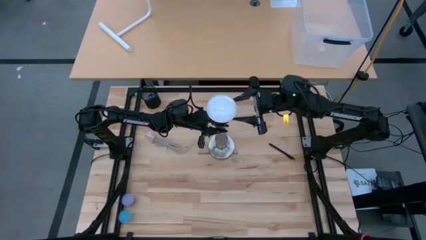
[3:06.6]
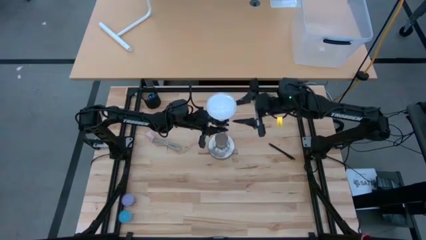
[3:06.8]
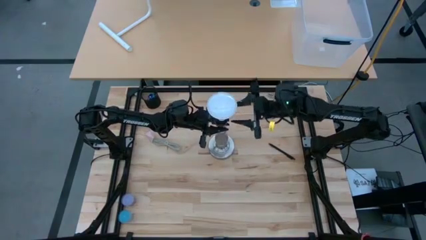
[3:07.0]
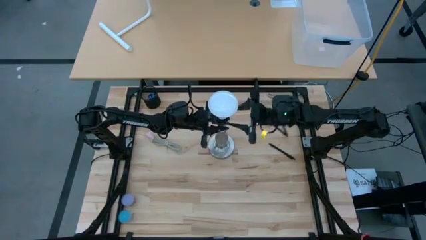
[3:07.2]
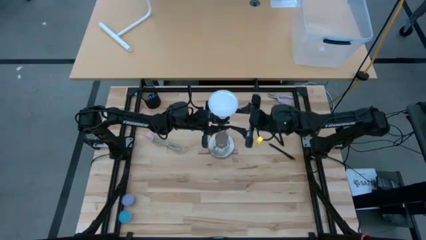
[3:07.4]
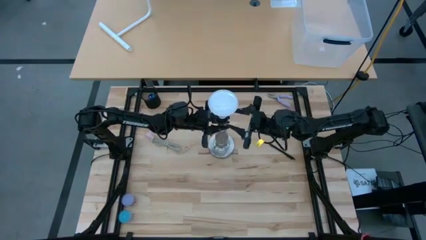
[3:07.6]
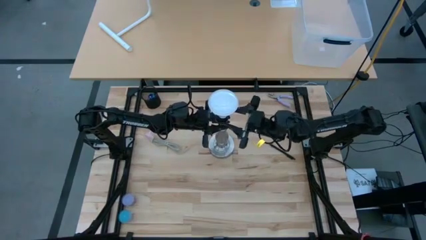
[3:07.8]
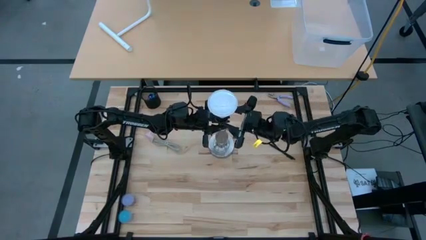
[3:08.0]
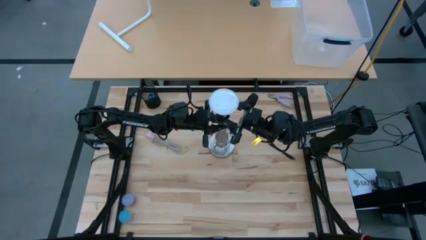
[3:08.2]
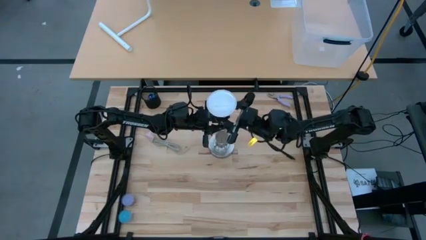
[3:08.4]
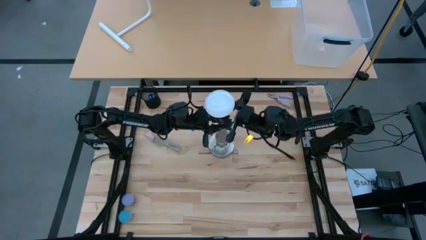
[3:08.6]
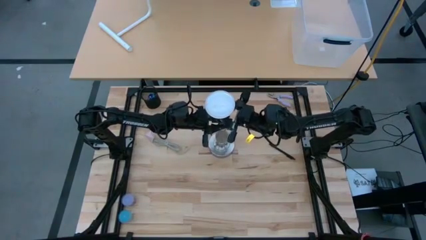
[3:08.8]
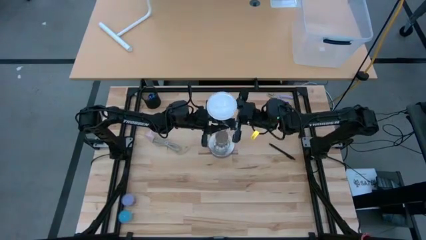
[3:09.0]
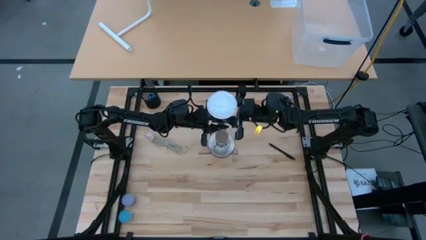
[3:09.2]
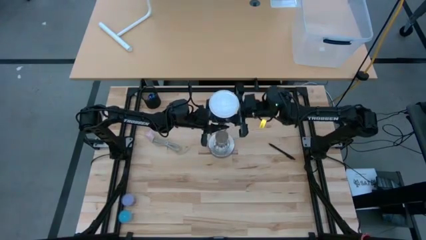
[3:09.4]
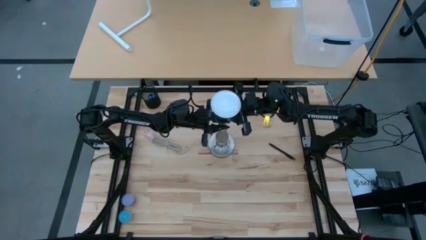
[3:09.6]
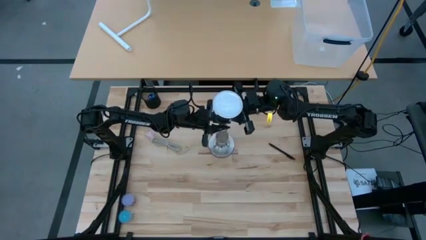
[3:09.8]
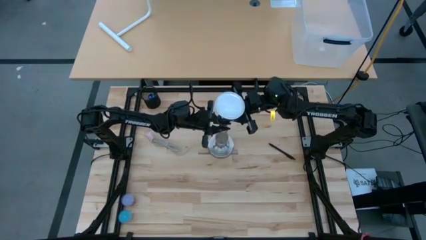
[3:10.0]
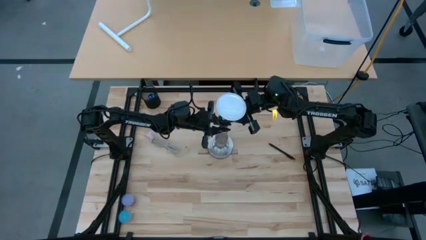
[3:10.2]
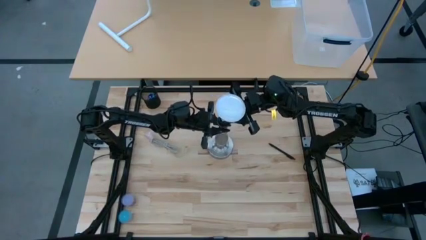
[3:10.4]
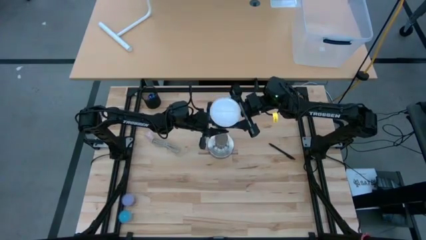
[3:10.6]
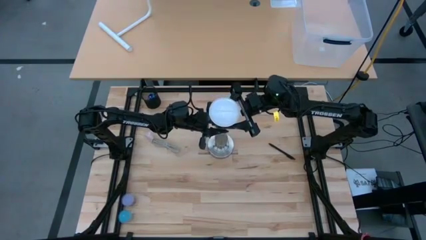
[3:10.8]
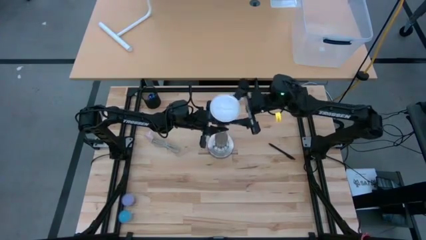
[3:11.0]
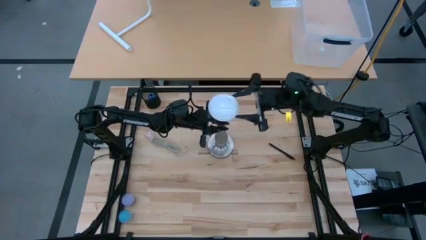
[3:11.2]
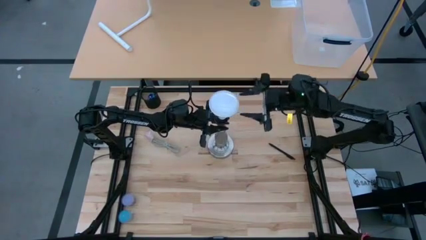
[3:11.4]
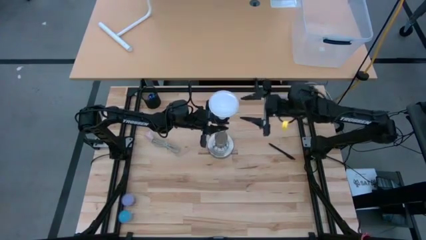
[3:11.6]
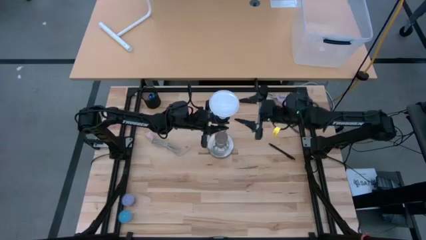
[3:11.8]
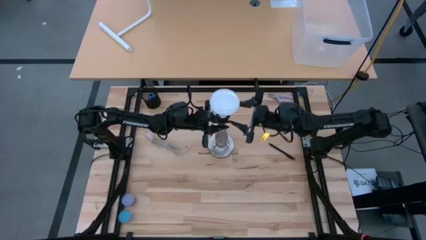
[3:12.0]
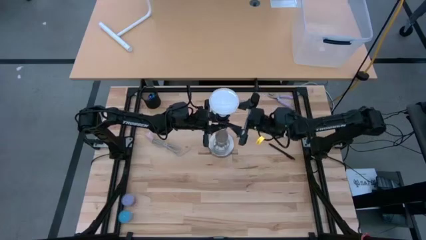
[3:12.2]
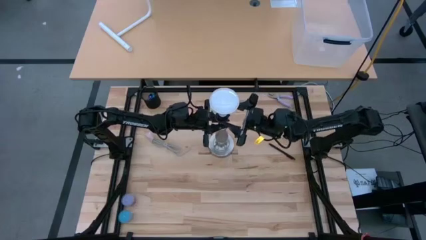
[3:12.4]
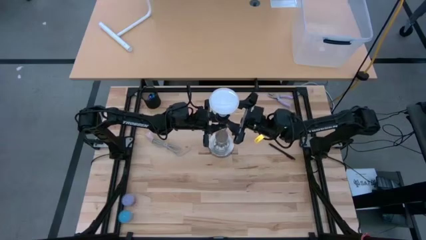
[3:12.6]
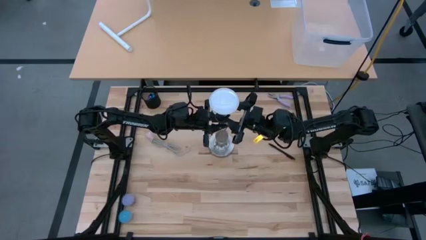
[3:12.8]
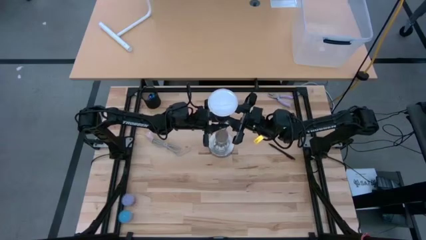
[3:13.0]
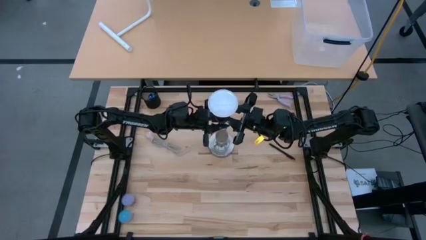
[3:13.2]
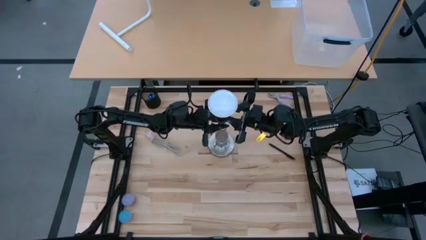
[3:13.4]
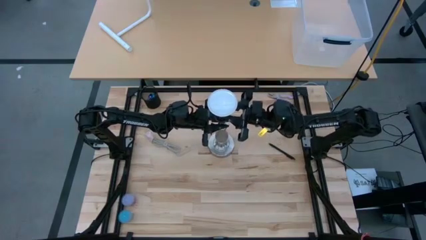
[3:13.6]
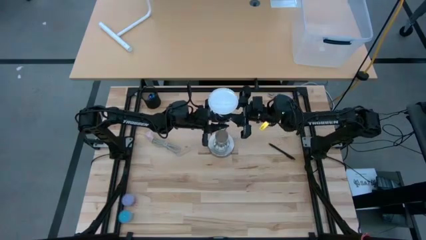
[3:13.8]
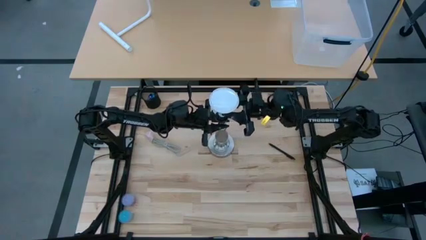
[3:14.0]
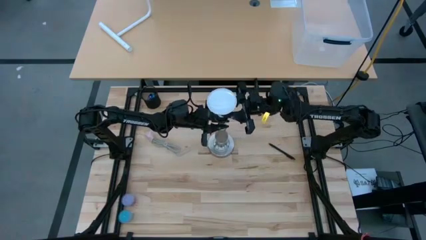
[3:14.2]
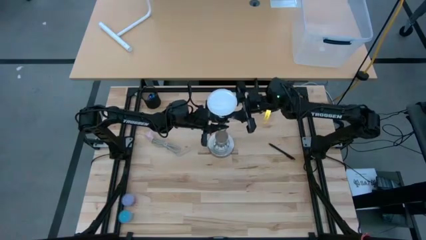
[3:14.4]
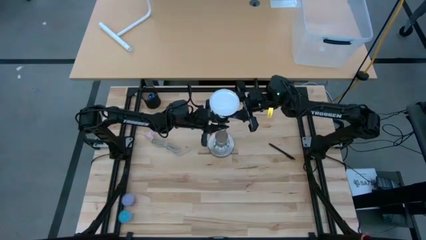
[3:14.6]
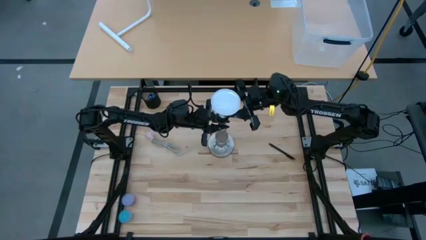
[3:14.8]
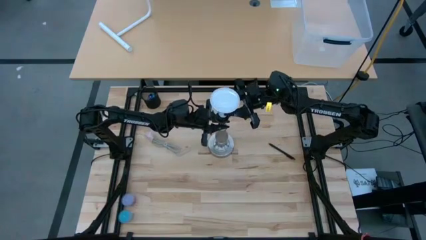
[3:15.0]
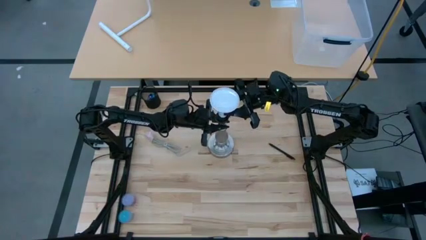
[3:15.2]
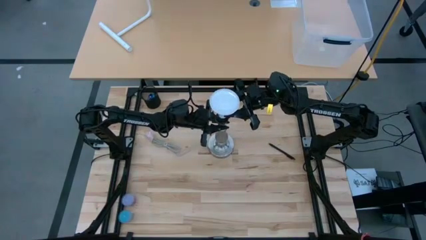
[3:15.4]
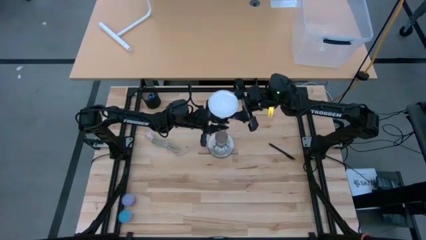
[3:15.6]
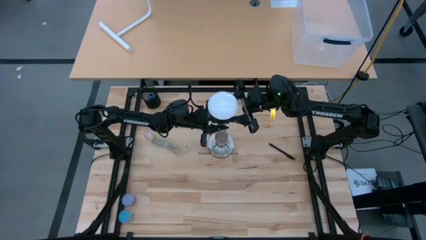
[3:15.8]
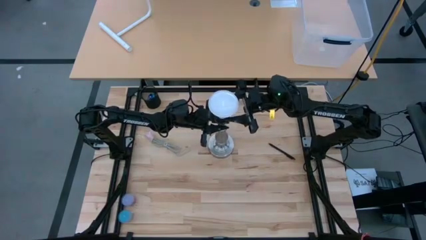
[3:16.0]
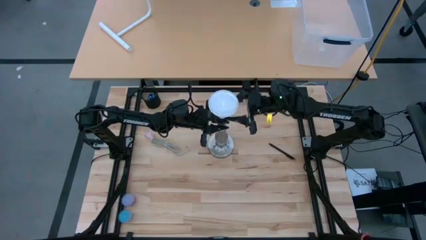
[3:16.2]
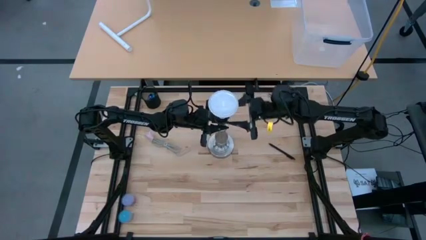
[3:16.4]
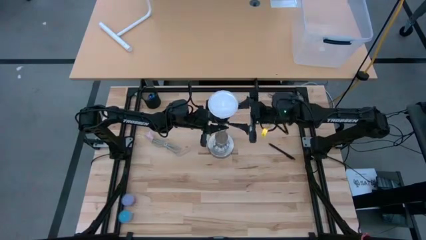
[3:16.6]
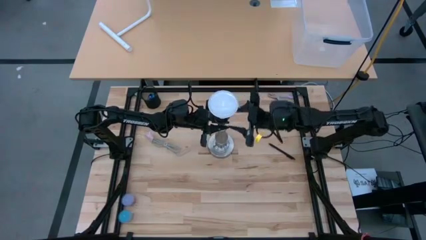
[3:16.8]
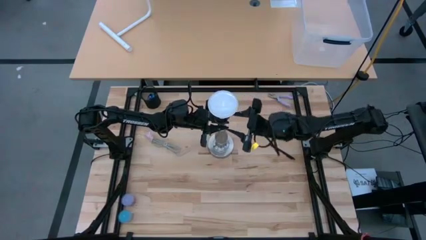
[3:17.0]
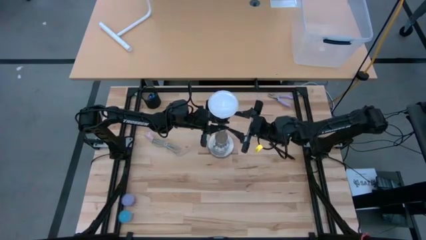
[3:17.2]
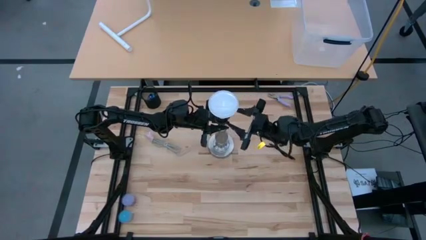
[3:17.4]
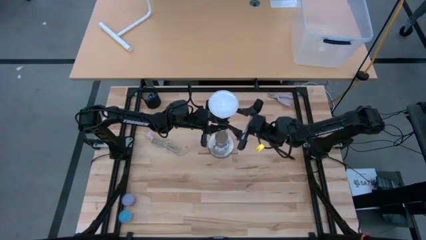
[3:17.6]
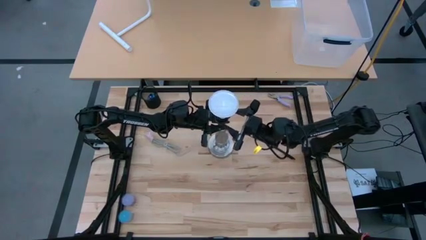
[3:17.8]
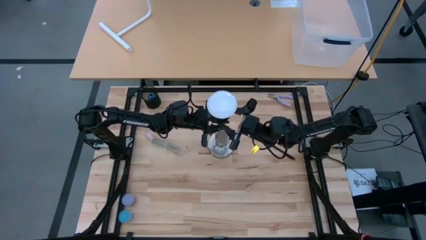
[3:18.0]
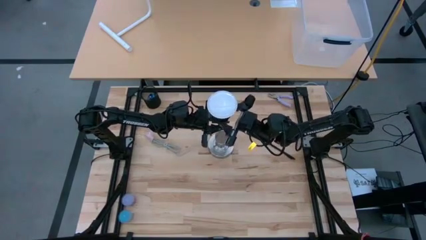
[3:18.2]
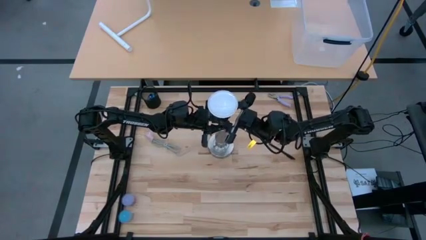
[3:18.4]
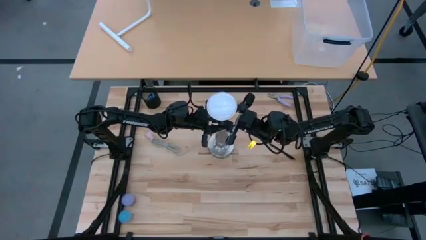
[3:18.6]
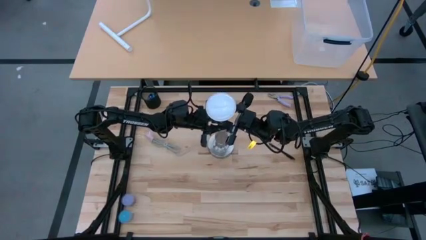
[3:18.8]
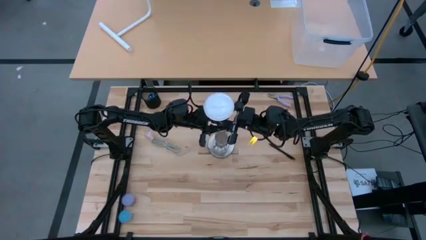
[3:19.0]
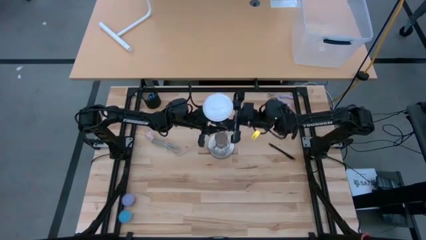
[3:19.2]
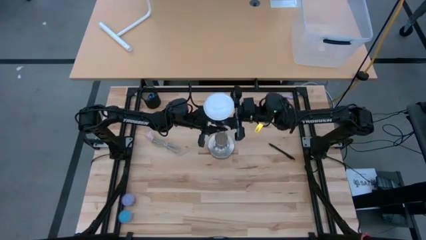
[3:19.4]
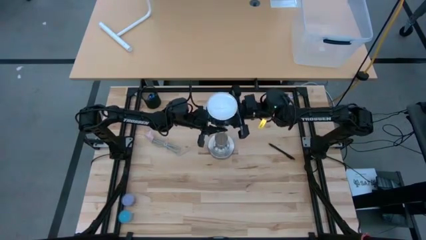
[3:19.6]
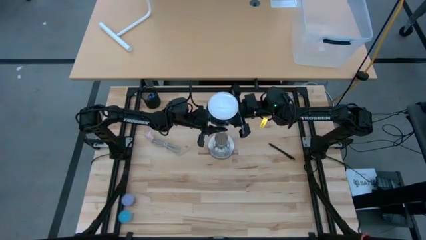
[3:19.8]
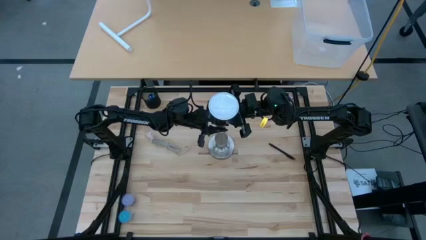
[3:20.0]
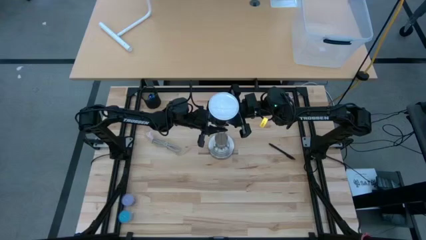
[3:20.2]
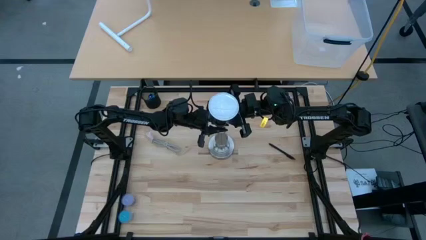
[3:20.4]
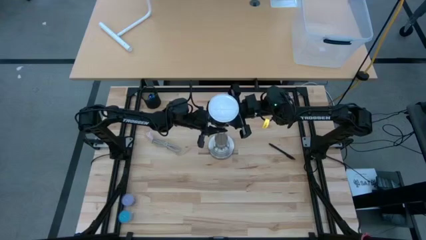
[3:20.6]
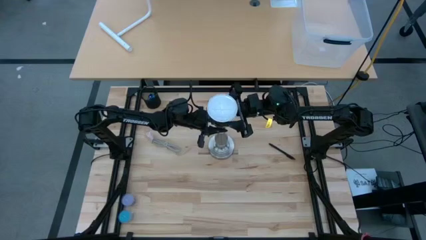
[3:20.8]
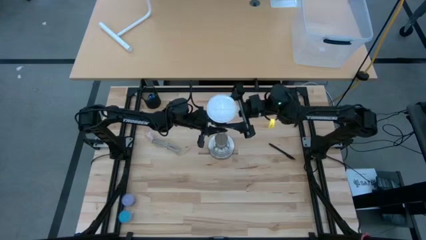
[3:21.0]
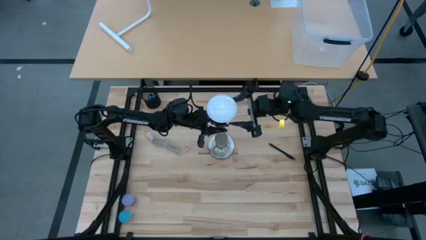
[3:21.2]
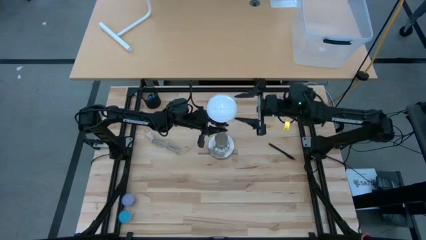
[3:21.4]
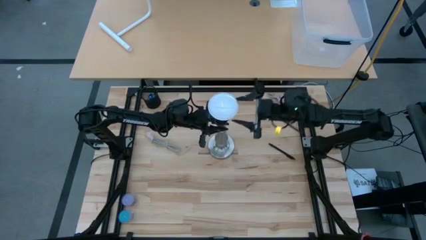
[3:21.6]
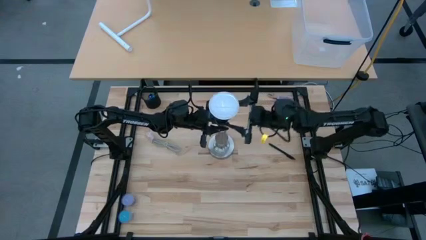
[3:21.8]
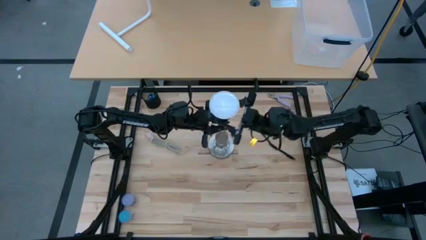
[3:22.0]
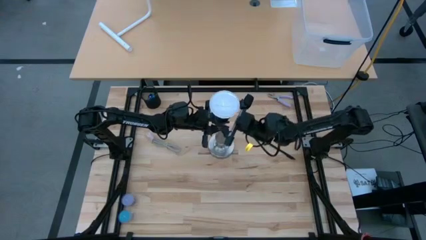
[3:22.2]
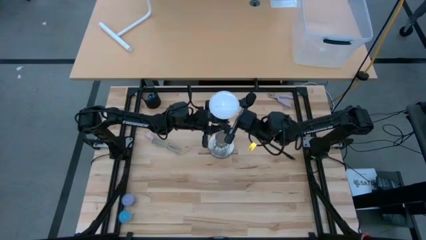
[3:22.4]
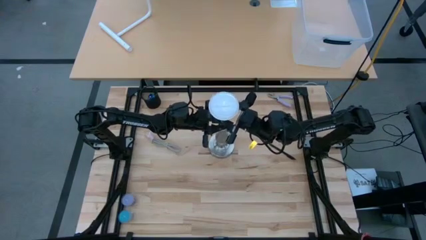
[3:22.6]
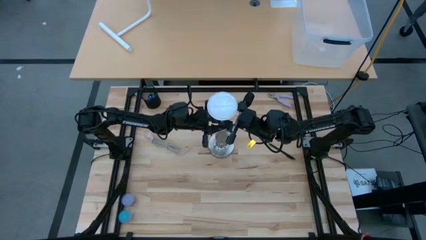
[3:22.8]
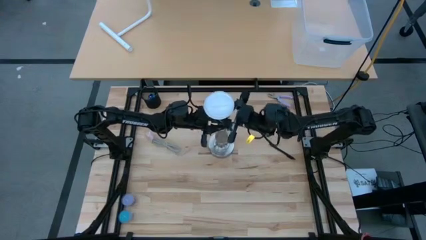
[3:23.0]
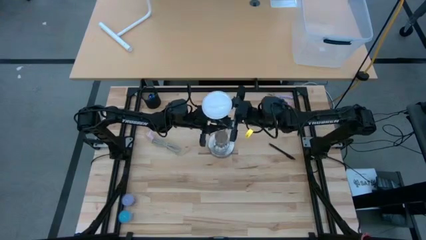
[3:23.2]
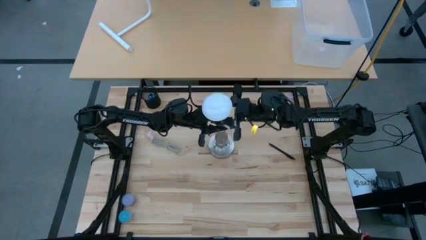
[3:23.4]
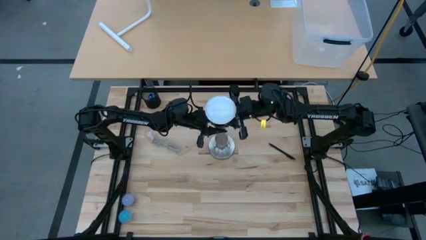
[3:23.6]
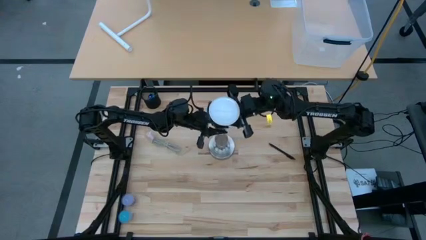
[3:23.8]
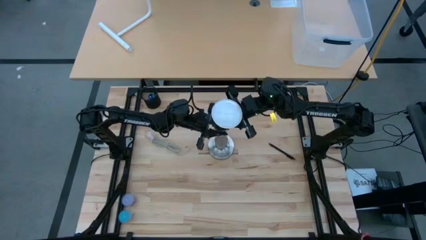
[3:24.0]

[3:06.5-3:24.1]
Task: Screw lightbulb
Remove the lightbulb from the lamp
